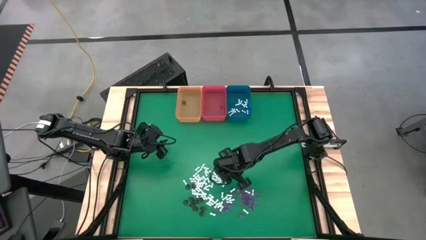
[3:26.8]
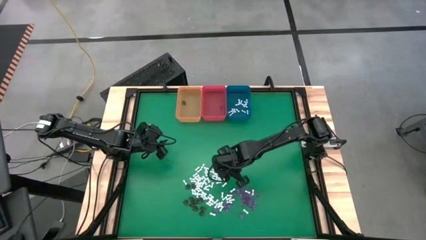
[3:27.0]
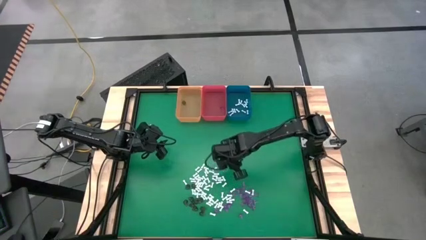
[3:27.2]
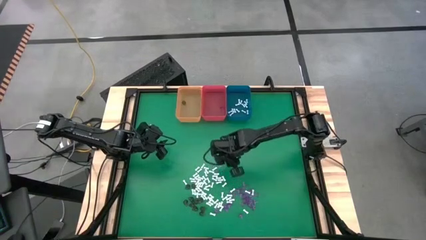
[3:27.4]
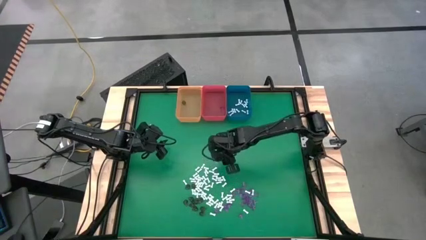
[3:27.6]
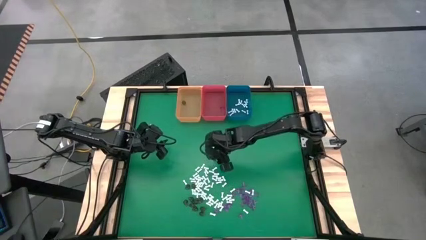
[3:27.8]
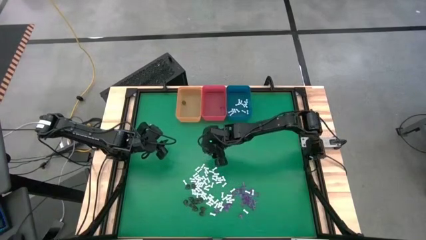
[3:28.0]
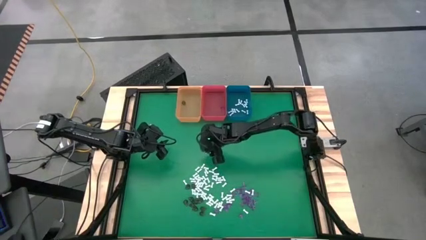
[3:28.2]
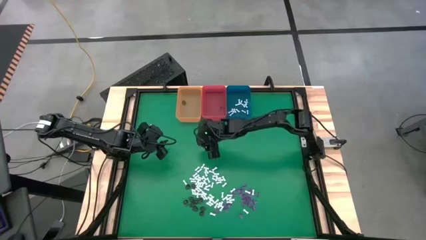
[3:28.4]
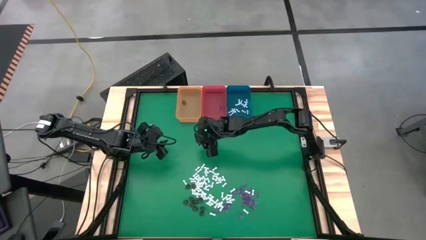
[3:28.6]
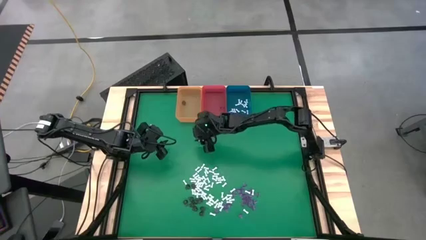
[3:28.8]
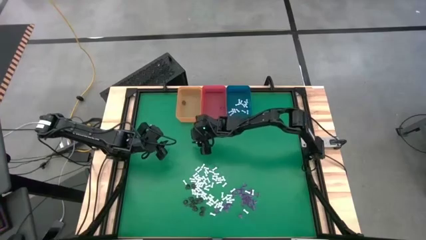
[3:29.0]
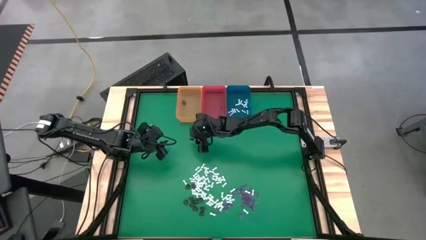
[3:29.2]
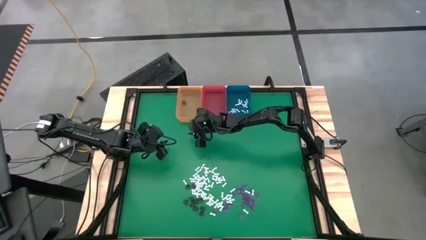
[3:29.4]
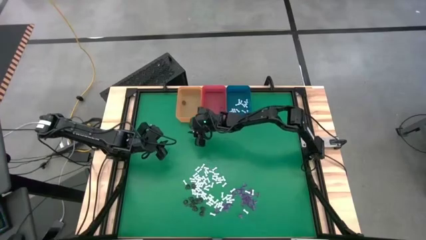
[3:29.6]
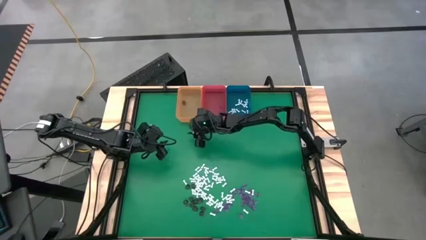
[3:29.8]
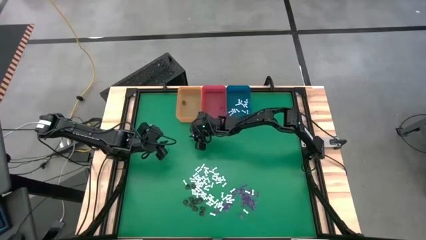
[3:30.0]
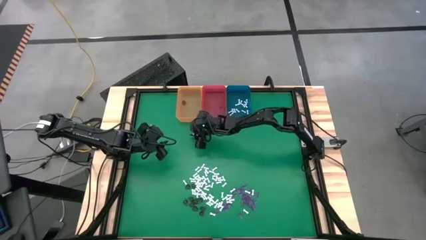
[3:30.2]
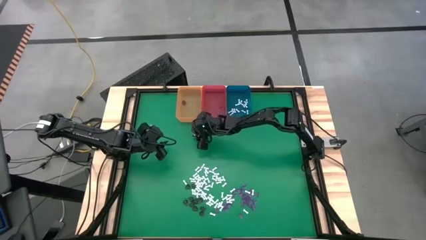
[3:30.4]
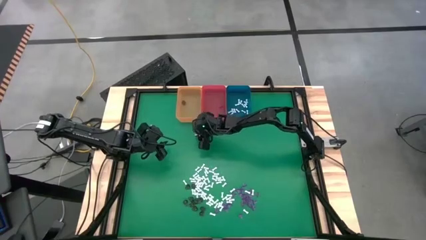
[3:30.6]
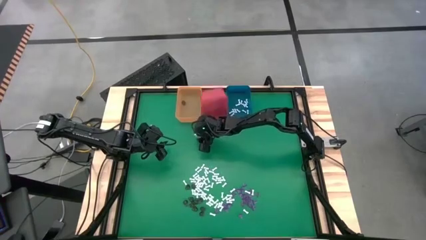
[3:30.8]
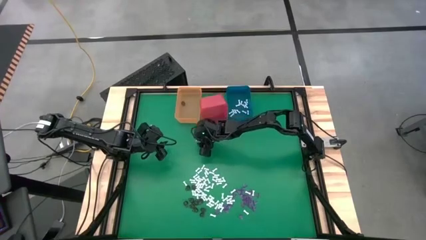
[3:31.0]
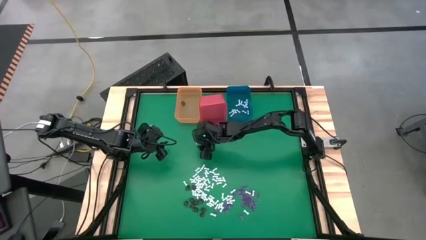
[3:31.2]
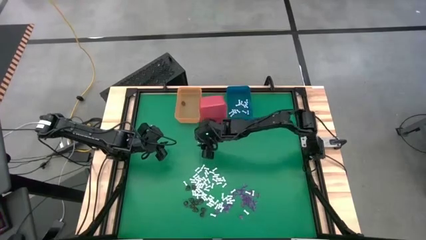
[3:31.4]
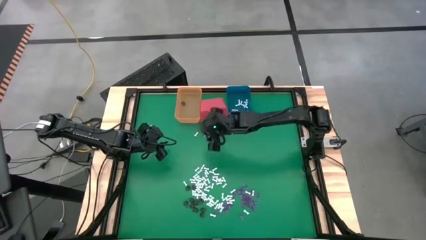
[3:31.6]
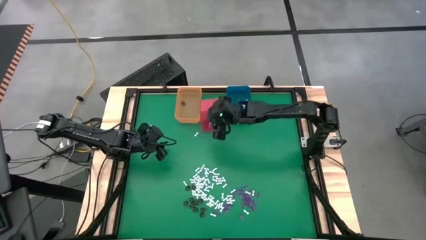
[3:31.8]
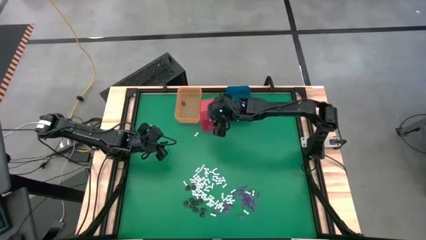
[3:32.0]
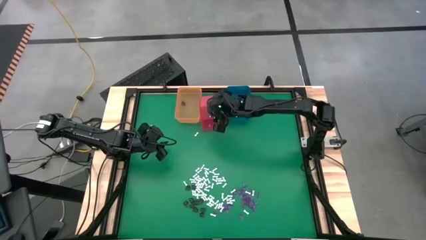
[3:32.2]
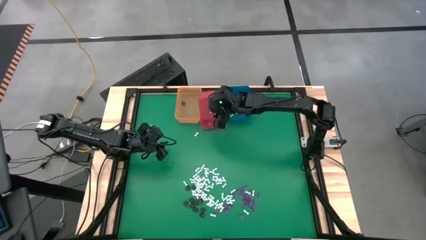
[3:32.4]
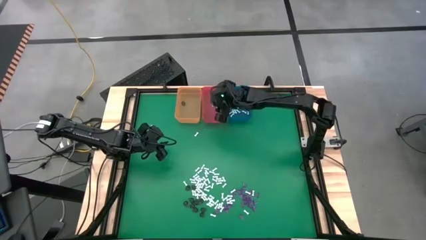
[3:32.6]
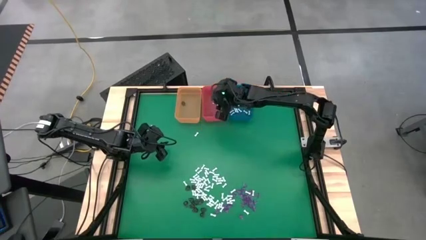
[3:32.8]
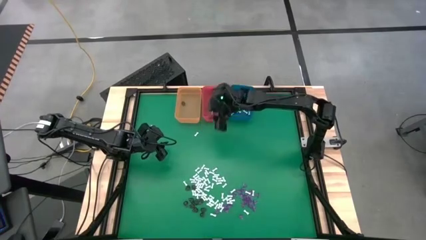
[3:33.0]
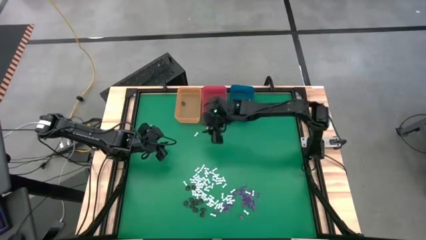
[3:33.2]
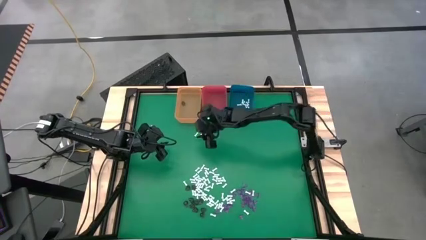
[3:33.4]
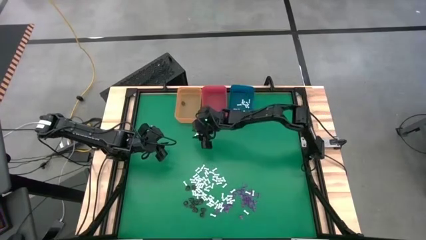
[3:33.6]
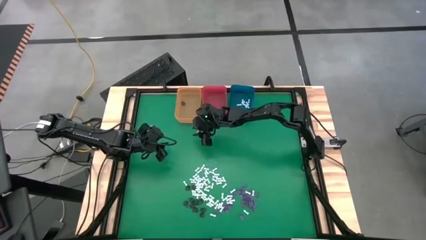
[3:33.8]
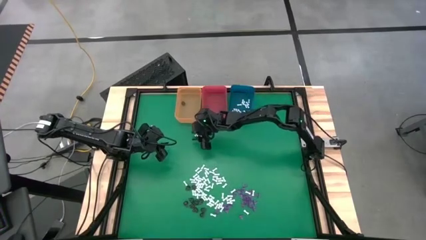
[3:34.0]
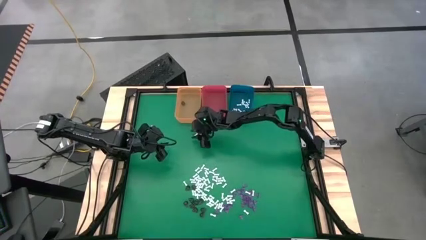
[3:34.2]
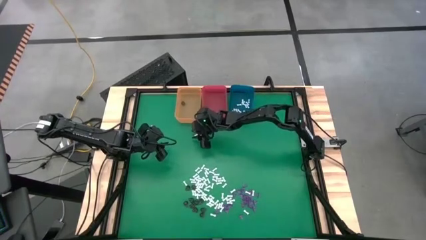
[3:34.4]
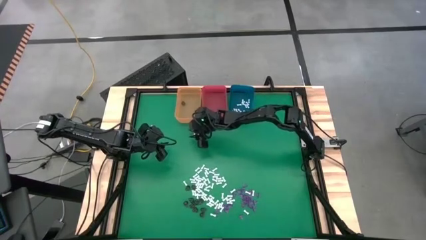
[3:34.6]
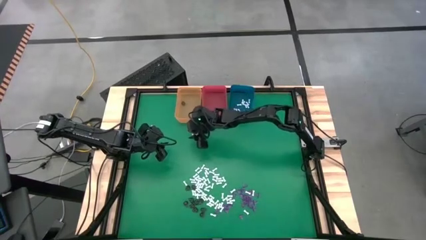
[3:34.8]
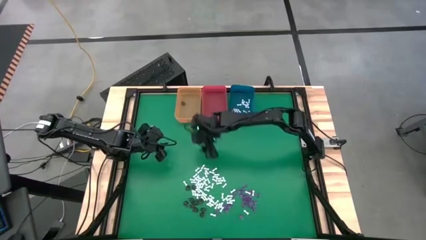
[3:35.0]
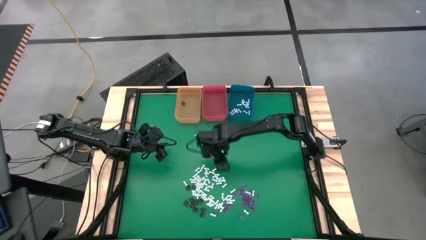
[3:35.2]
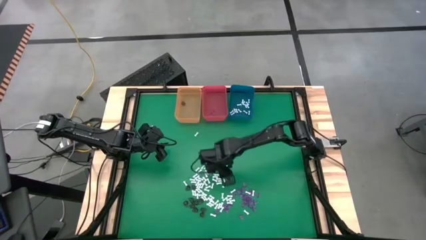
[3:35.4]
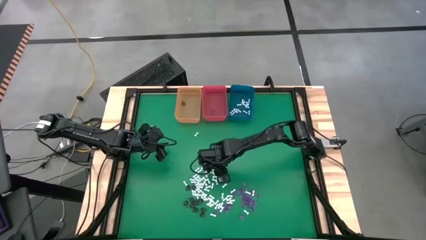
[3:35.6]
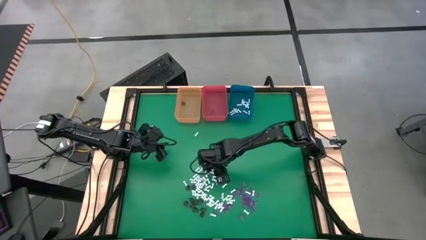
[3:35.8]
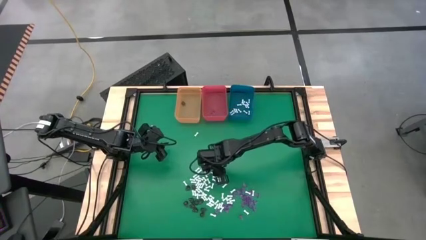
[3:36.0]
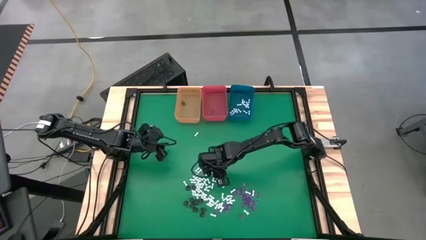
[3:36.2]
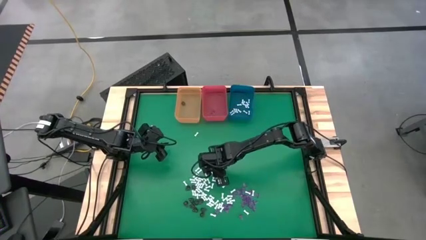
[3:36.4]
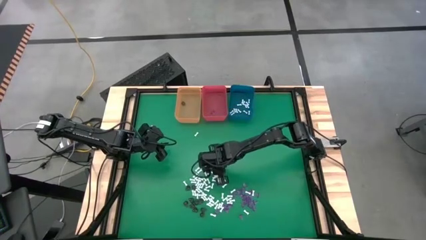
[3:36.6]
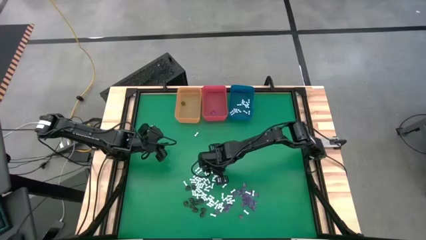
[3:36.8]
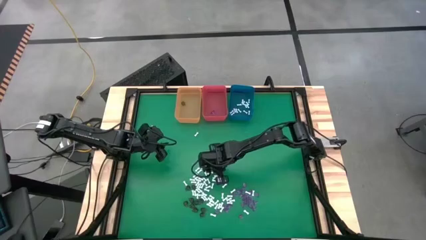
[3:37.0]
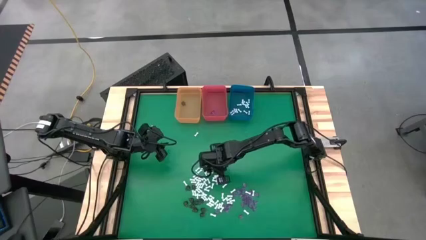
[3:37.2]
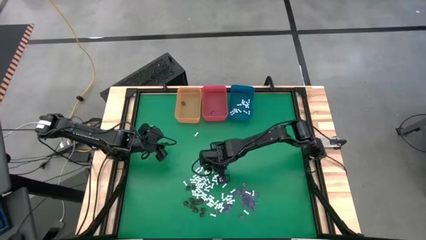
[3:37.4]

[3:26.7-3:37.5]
Task: Sort Halloween decoration
Put the white bone toy into the blue bin

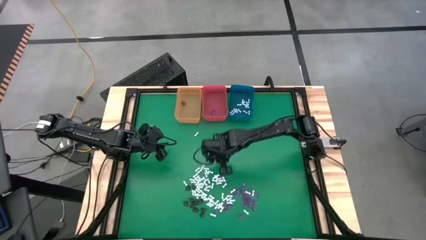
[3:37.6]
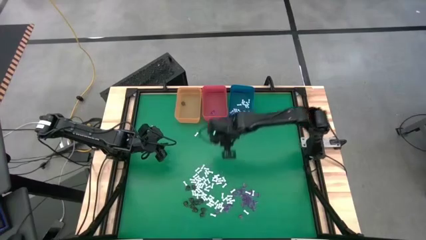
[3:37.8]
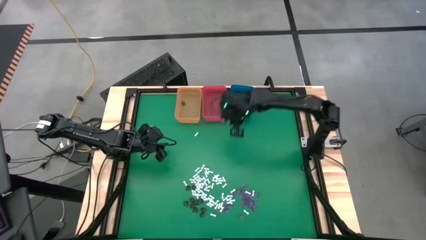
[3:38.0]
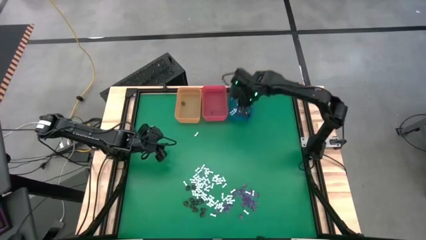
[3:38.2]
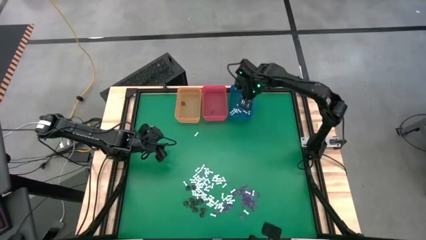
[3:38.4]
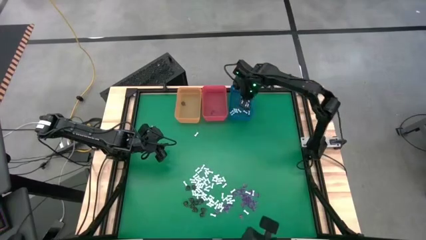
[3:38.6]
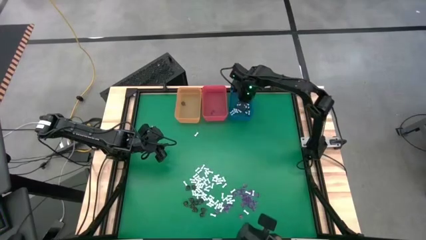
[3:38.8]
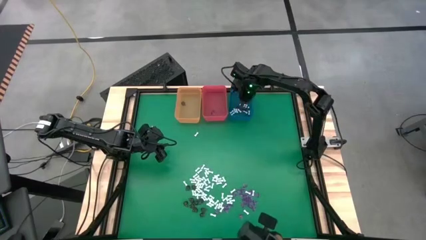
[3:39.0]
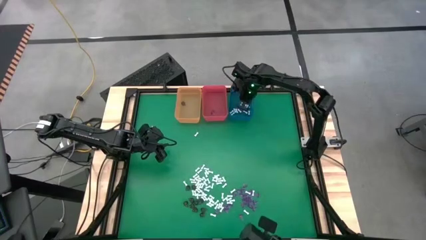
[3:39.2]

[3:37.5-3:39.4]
Put the white bone toy into the blue bin

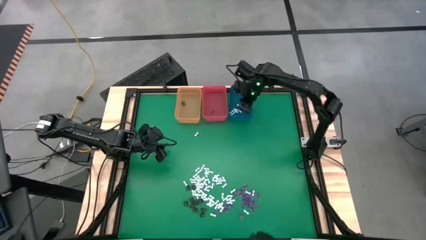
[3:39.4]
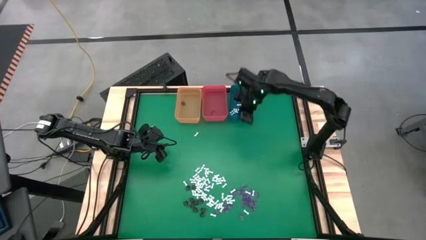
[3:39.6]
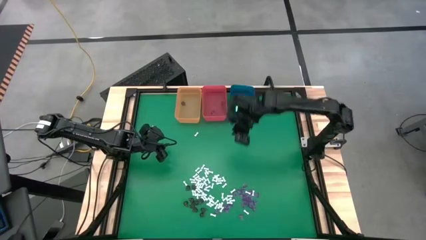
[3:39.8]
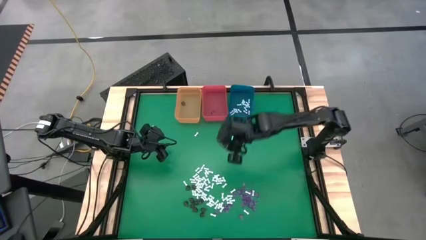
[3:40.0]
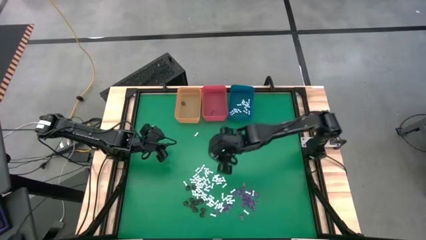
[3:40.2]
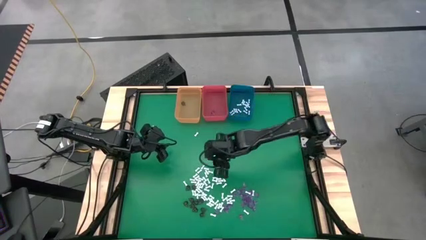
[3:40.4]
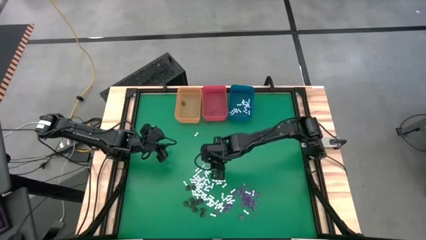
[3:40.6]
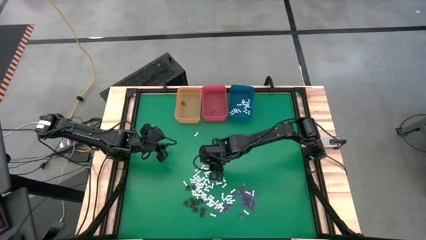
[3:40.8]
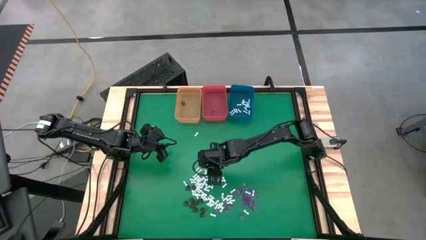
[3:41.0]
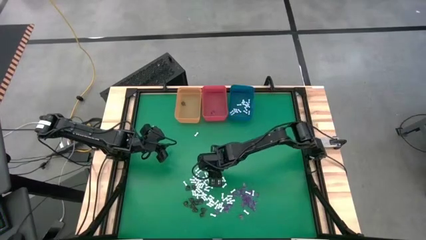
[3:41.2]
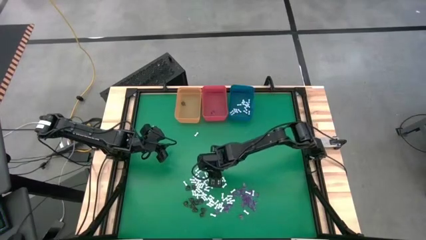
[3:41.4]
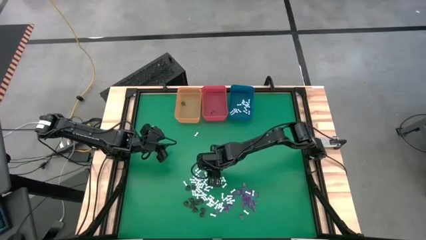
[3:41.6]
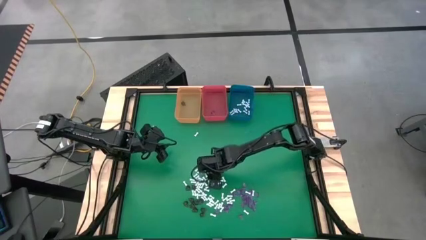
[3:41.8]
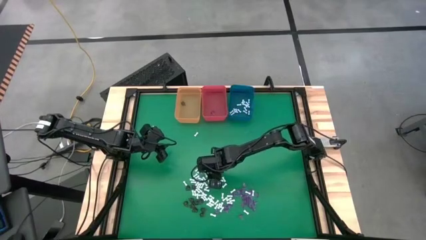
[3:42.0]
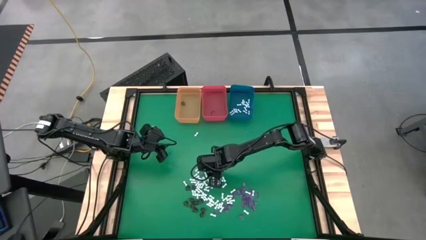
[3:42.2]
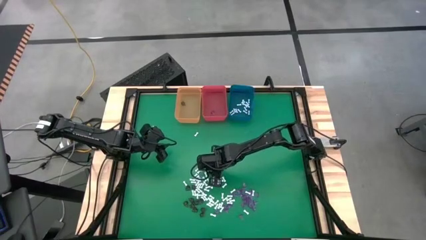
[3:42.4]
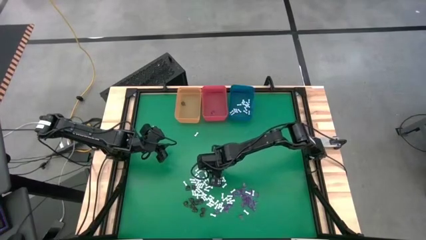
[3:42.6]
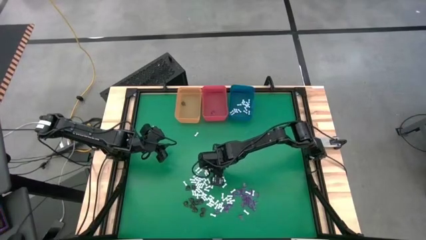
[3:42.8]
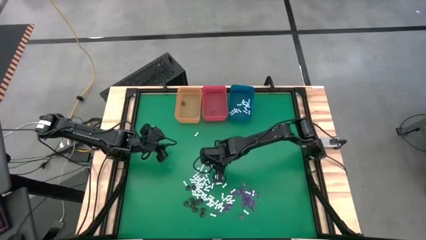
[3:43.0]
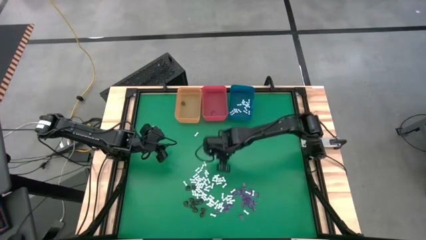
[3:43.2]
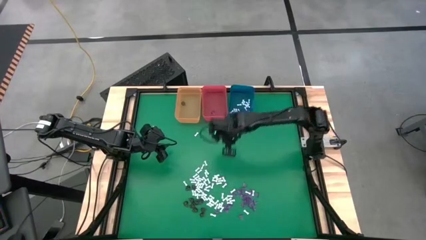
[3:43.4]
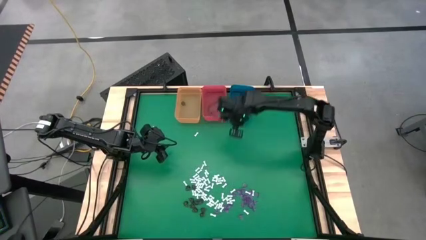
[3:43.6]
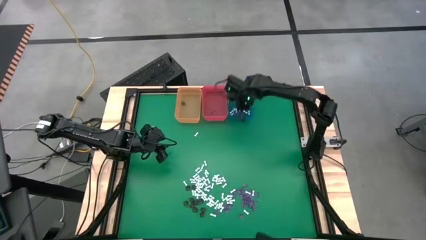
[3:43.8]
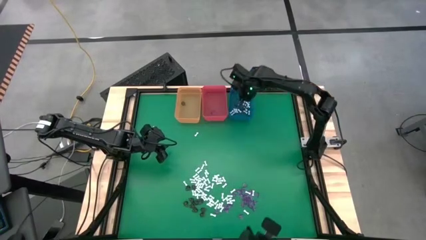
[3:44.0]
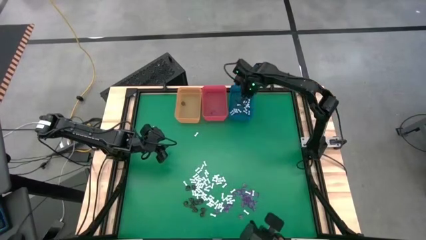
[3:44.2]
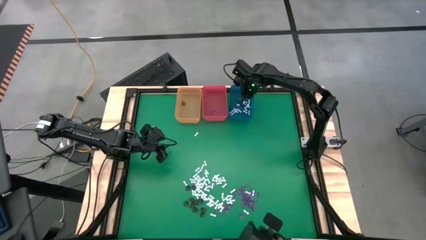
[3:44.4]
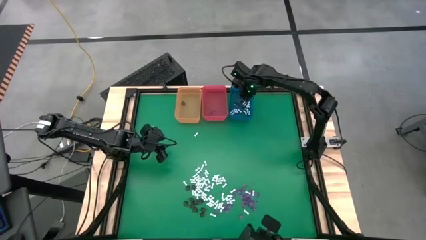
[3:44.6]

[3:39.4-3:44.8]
Put the white bone toy into the blue bin
